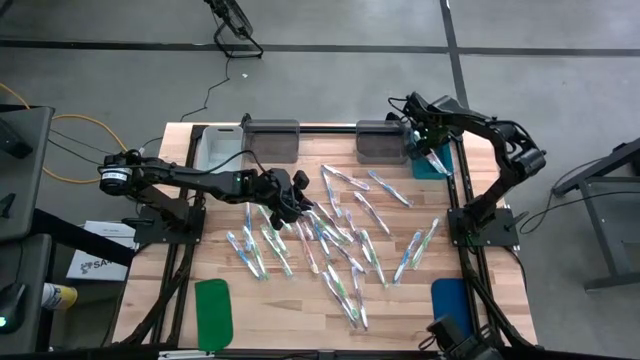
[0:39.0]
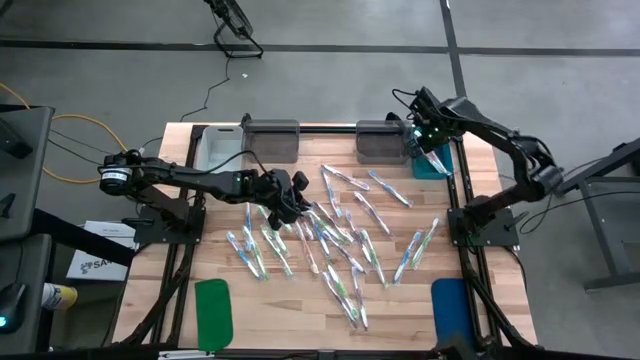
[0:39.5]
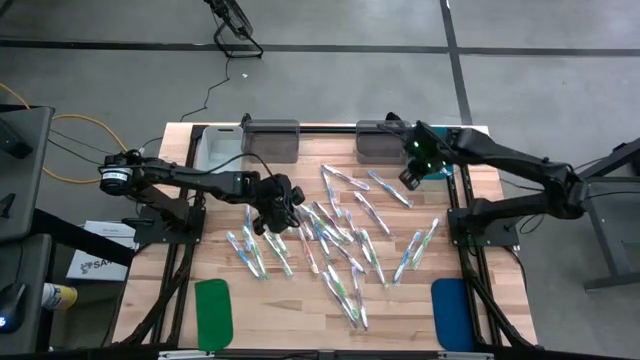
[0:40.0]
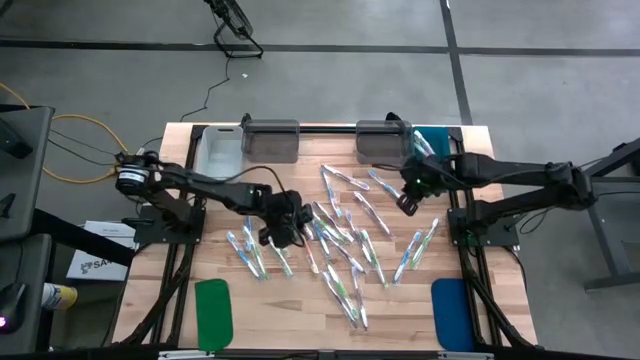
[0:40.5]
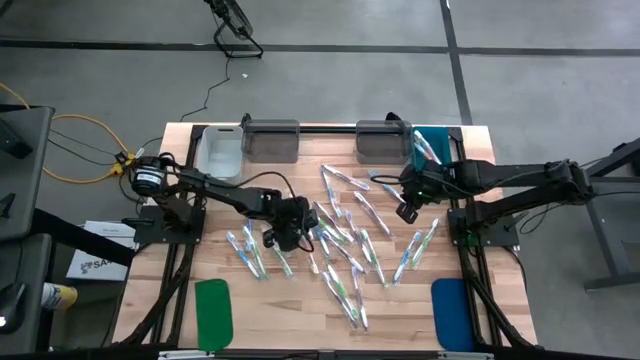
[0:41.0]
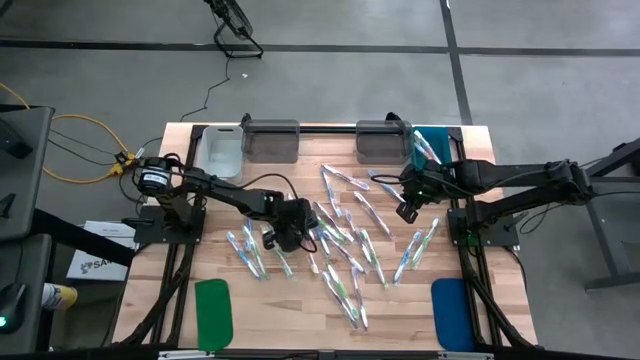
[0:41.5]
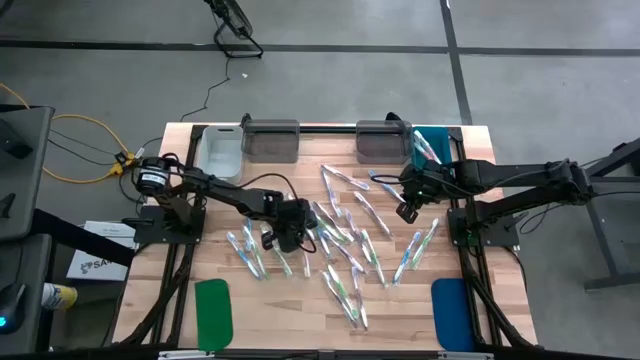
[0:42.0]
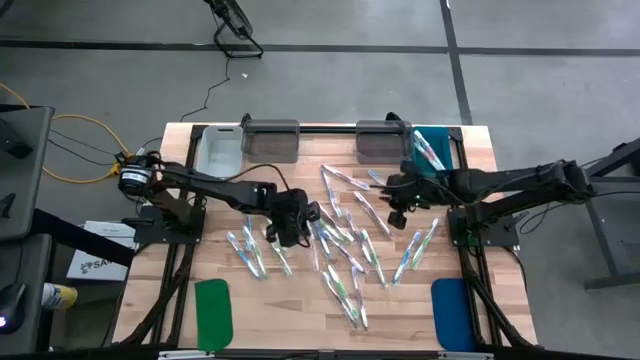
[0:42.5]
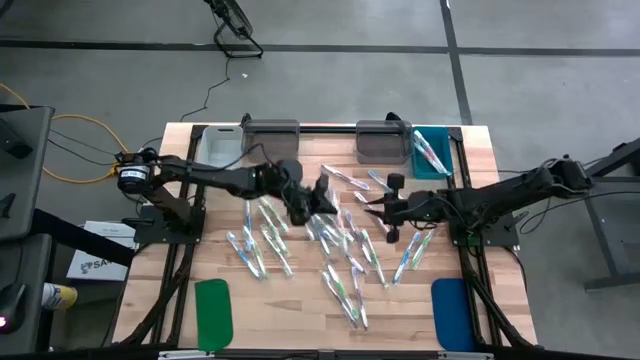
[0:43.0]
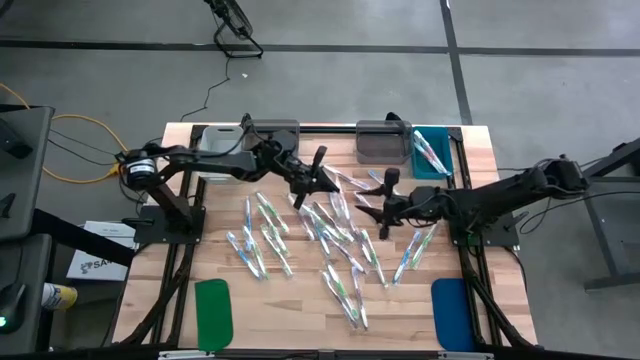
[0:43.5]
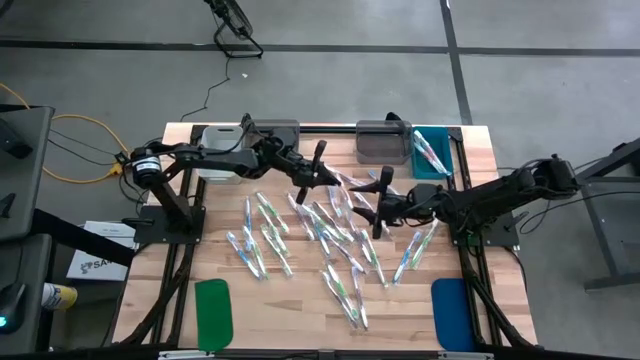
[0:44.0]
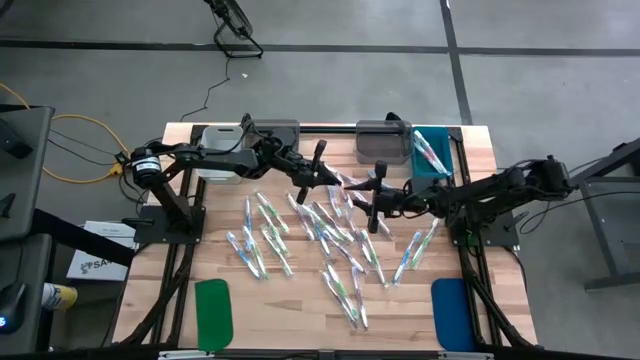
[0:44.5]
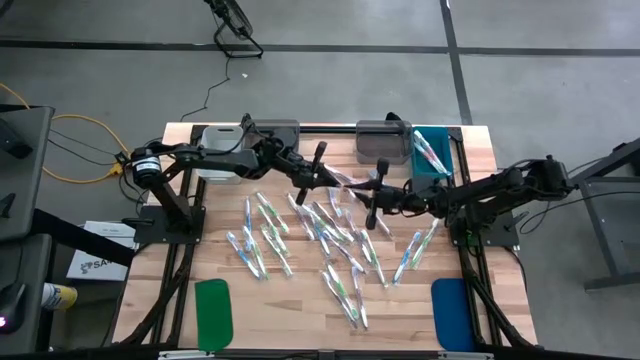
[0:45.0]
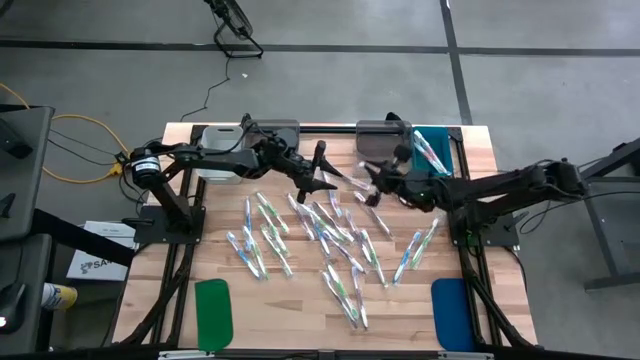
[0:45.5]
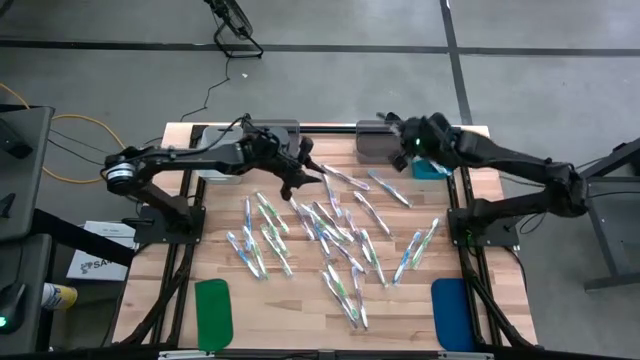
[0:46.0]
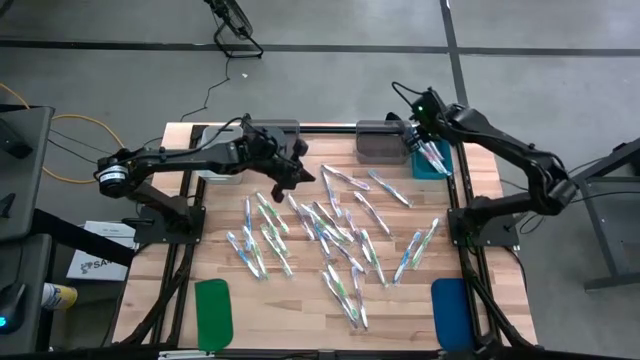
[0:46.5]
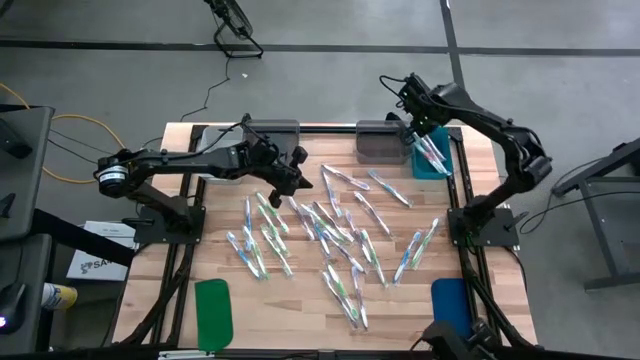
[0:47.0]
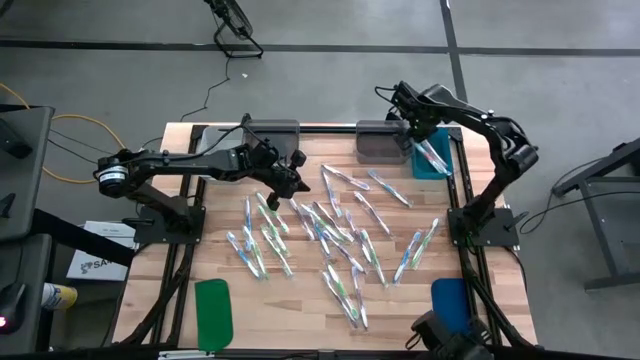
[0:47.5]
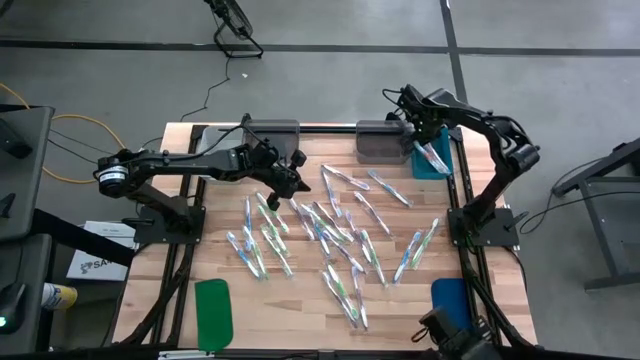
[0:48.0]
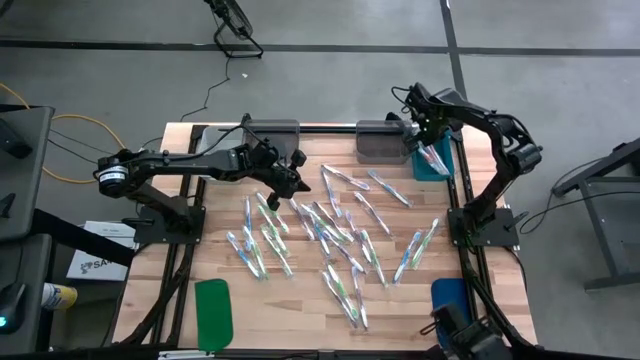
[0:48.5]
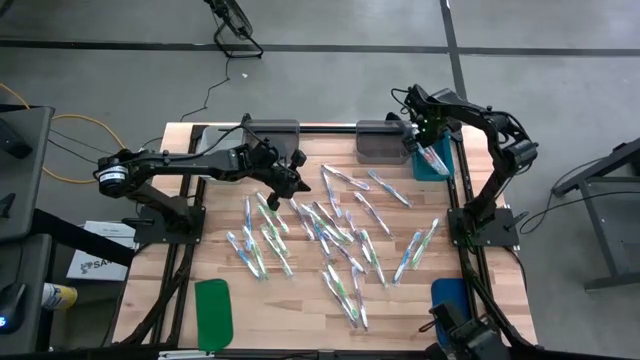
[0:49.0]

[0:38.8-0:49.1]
Task: Pick & Place Toothbrushes
Put the orange toothbrush into the blue bin

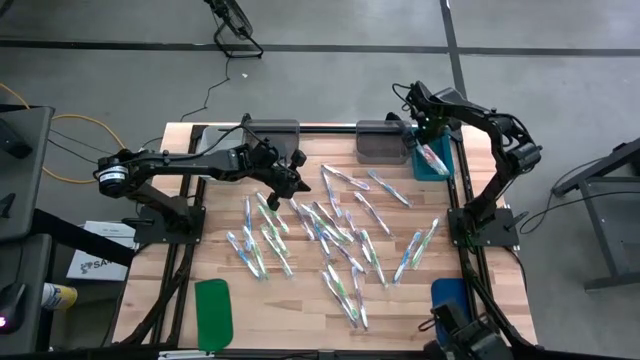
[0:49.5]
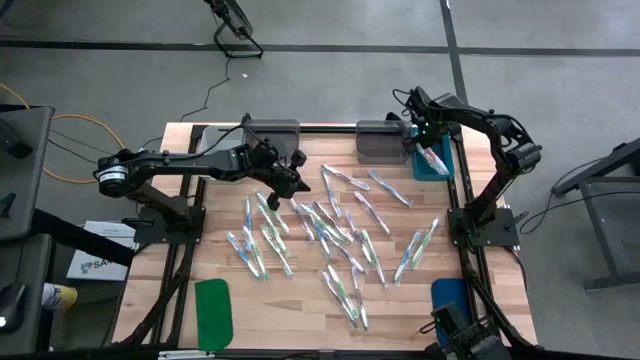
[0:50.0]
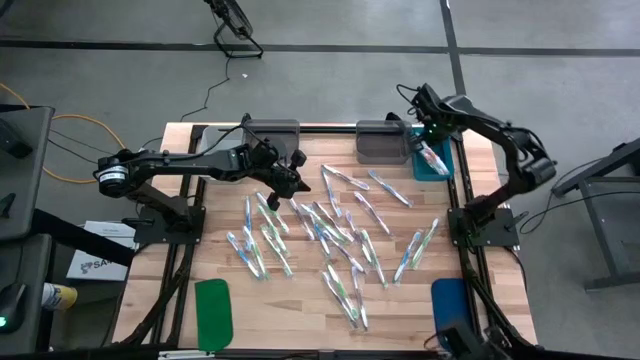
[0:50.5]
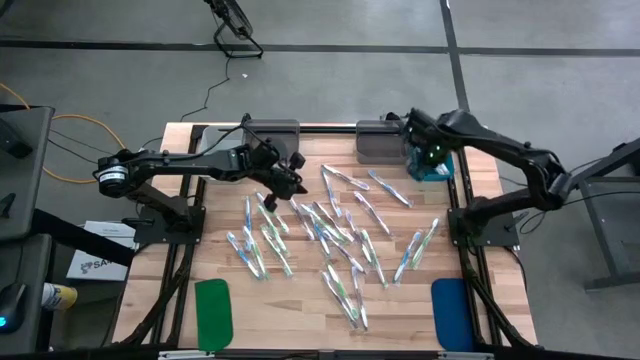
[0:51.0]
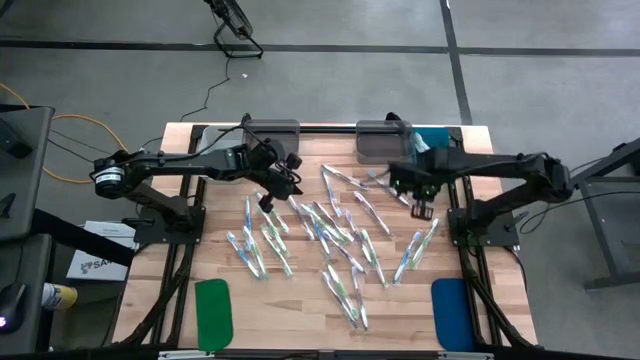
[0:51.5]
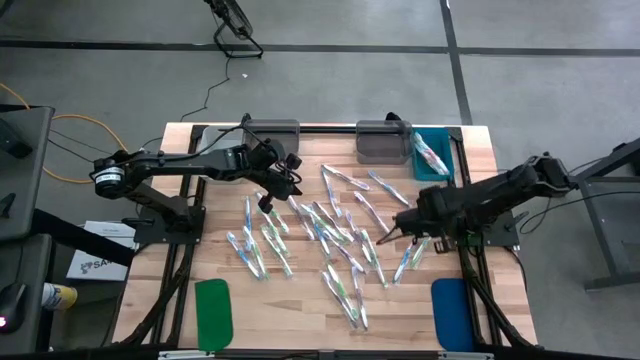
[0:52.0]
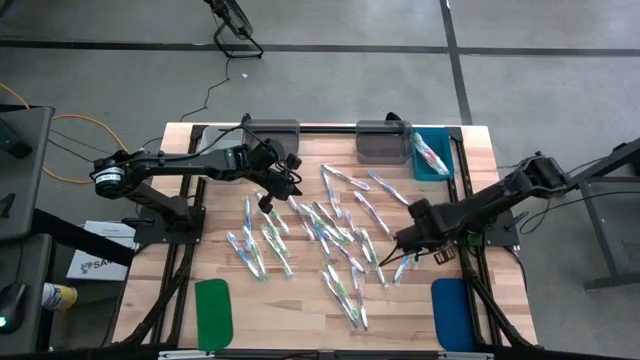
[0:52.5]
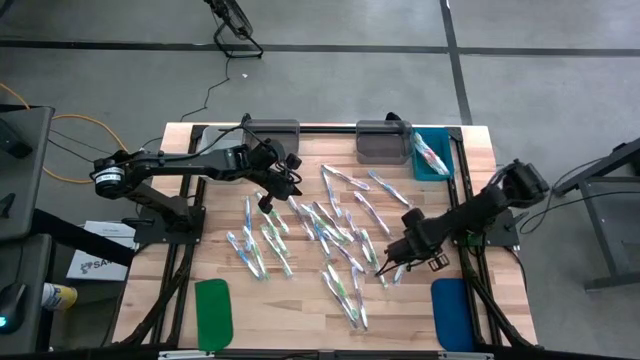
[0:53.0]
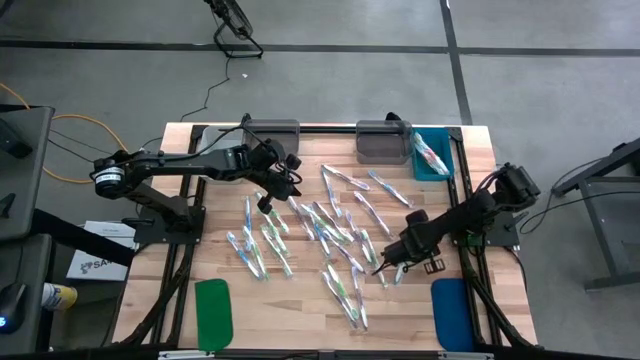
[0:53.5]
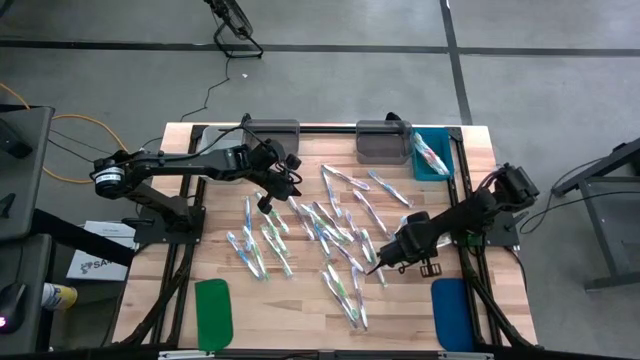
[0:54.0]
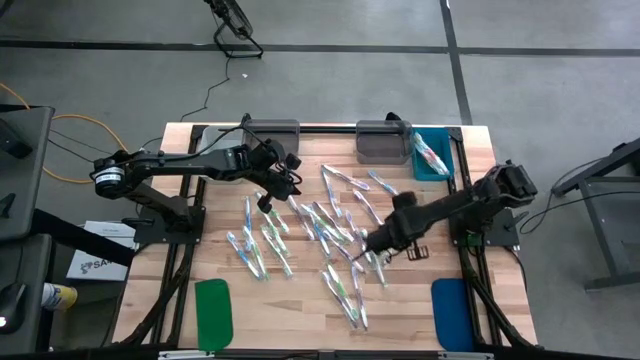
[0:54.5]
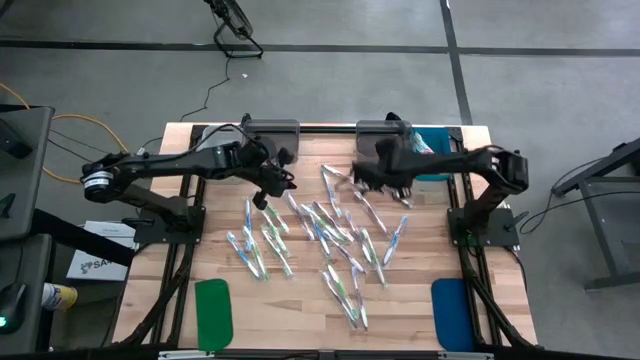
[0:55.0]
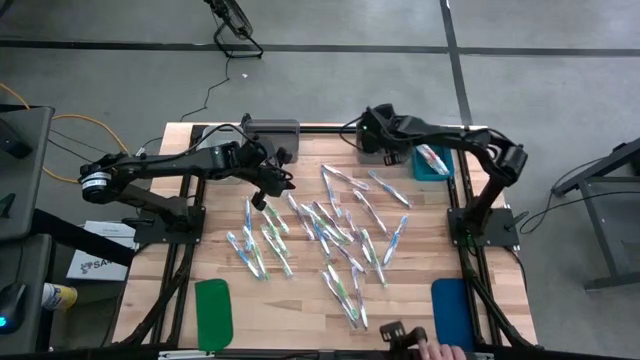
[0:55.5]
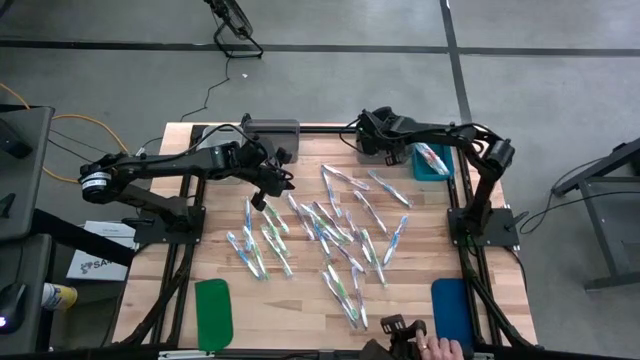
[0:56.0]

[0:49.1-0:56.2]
Put the green toothbrush into the right black bin

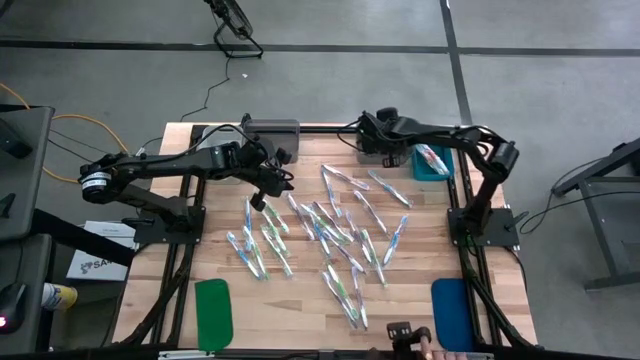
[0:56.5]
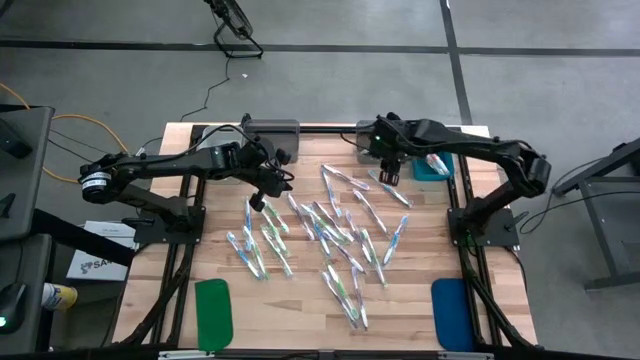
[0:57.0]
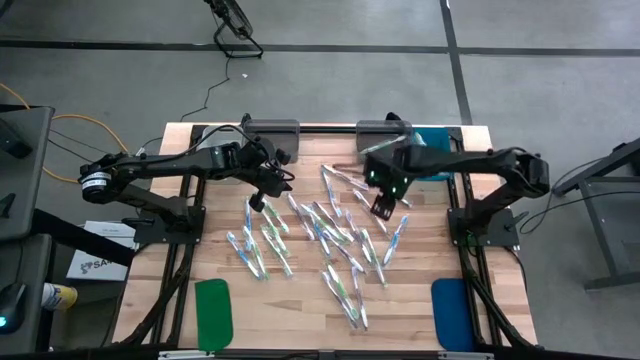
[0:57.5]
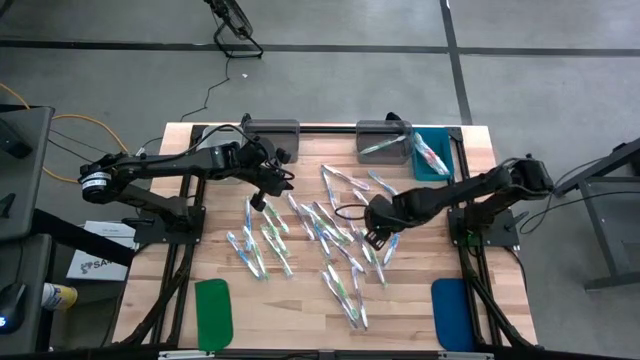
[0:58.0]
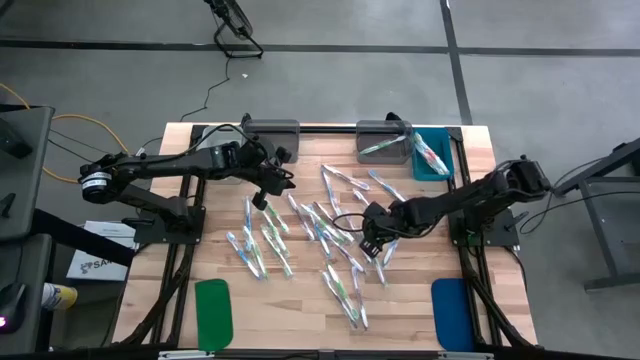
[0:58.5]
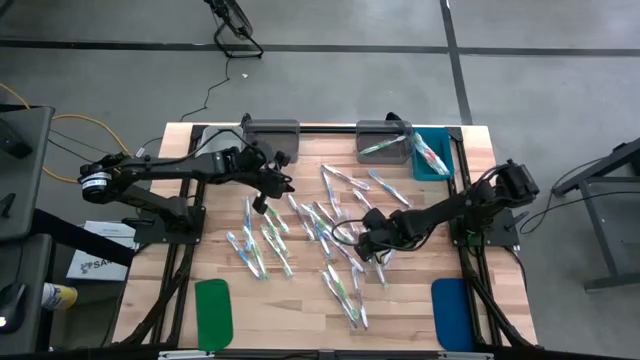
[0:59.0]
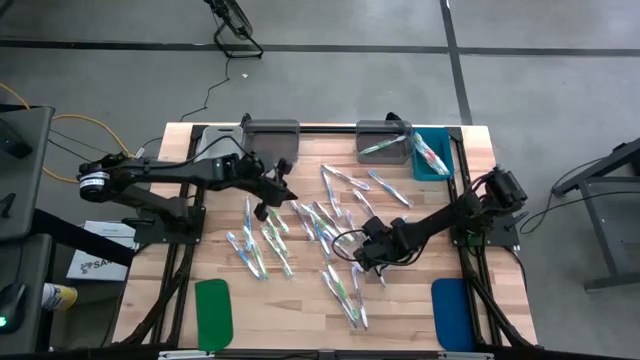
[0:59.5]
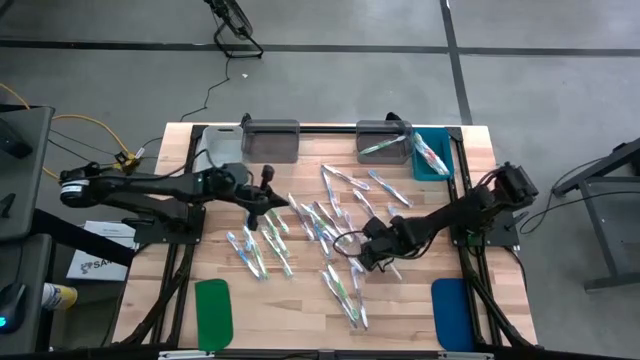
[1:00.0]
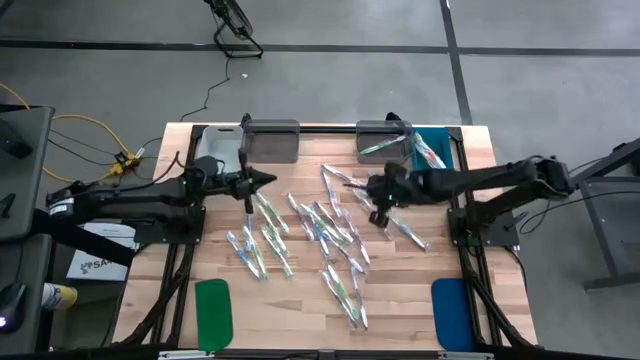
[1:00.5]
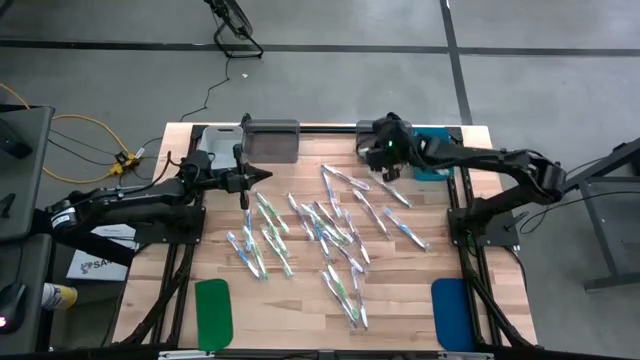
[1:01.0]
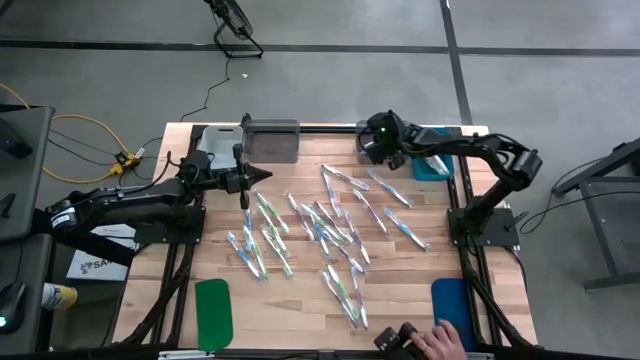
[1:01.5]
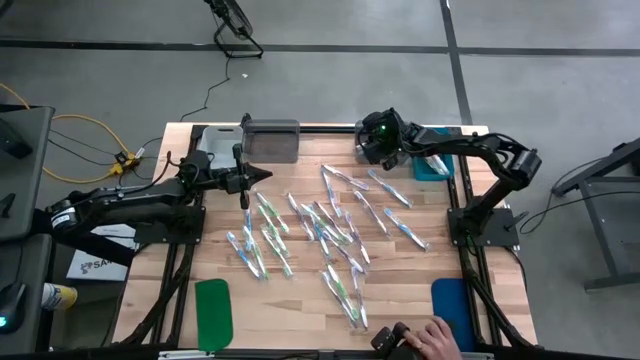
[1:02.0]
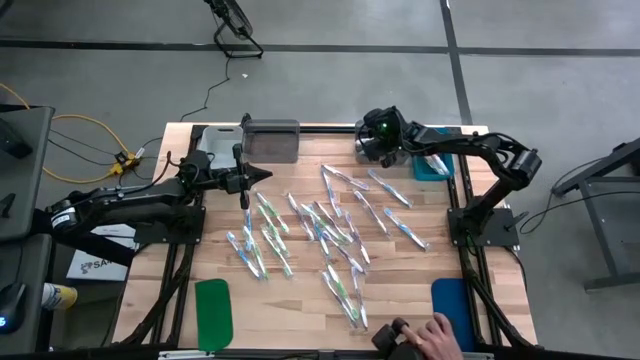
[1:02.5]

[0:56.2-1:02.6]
Put the green toothbrush into the right black bin
